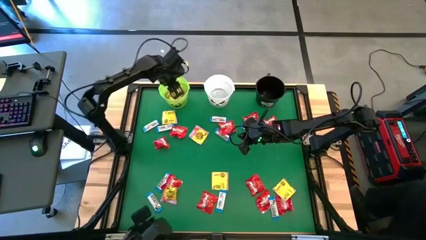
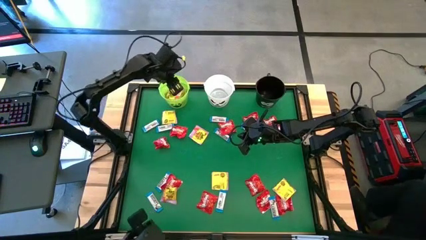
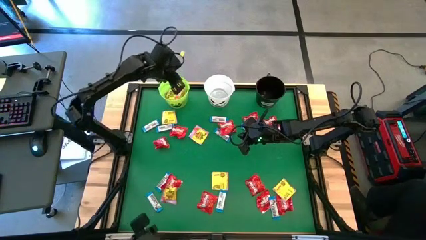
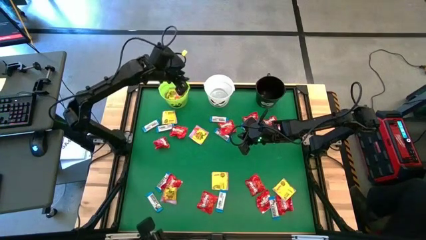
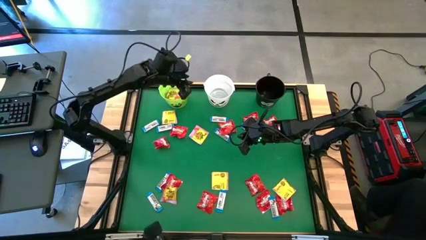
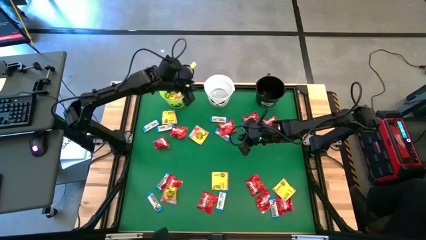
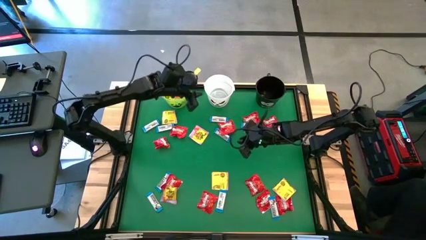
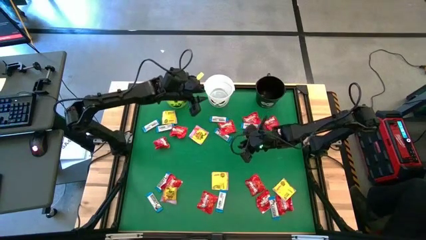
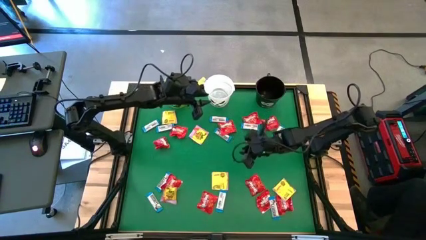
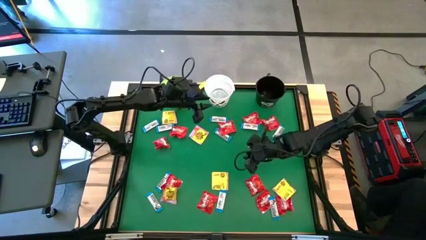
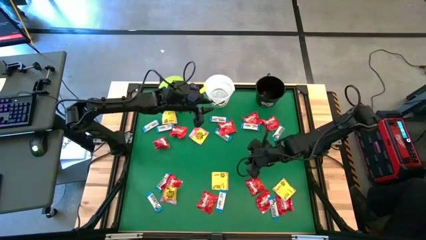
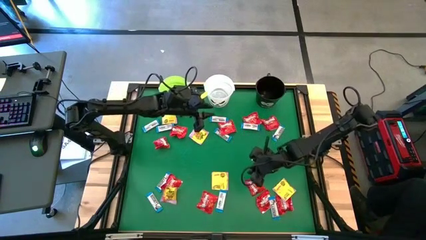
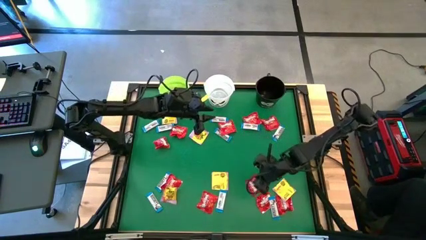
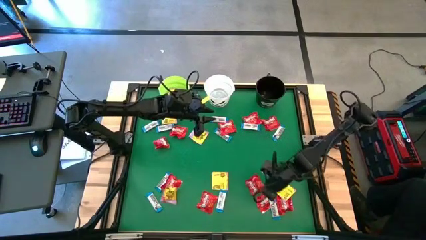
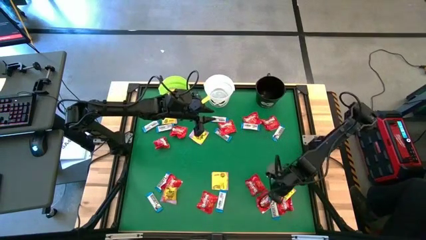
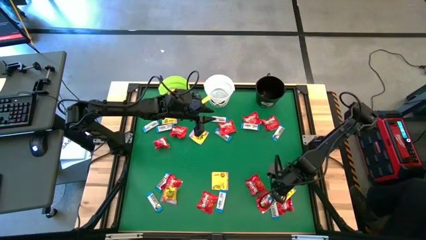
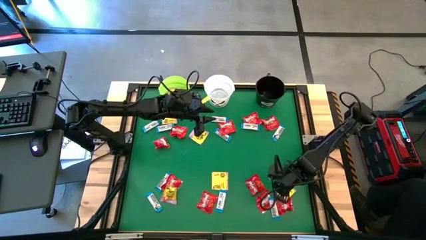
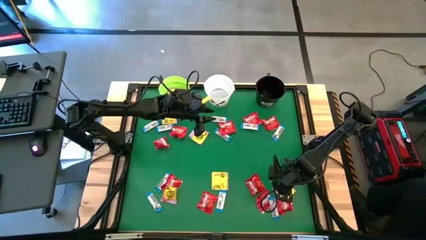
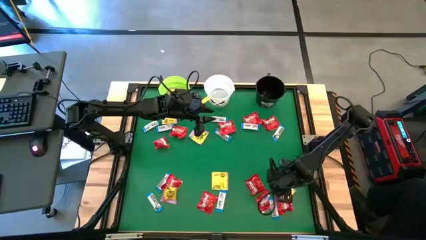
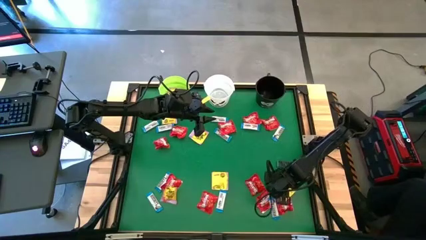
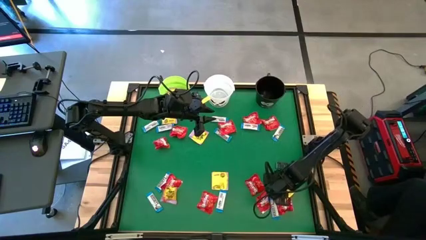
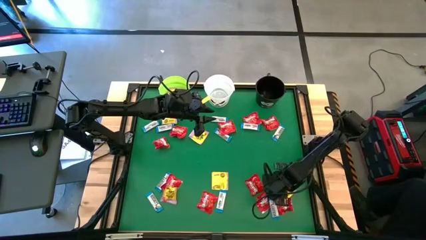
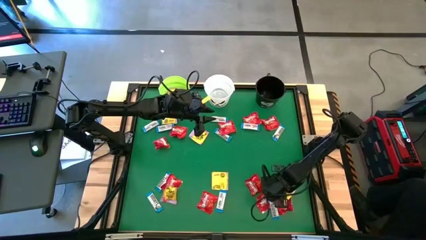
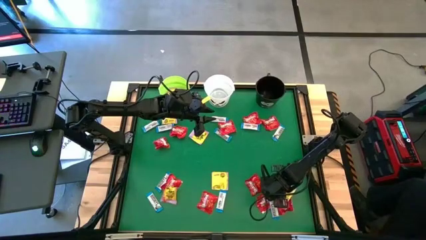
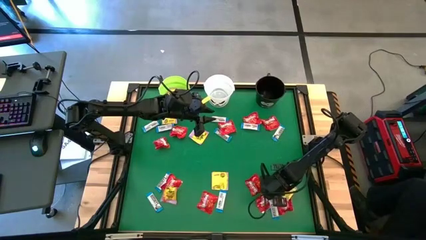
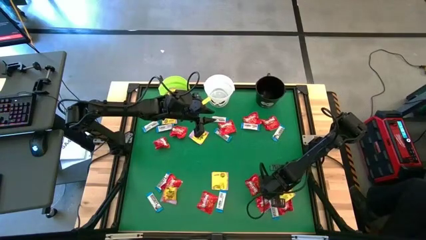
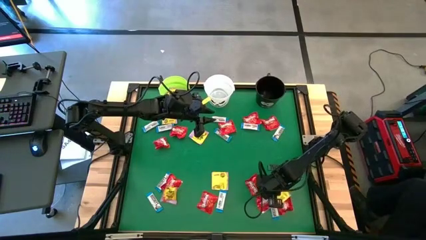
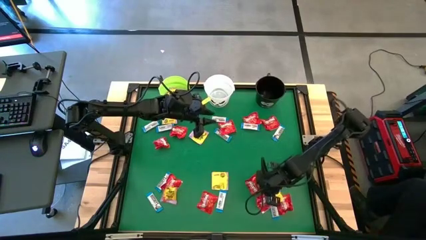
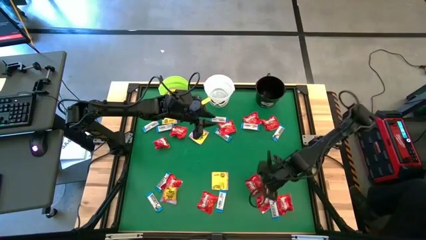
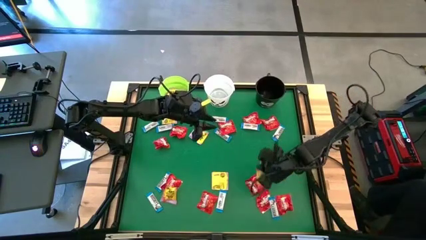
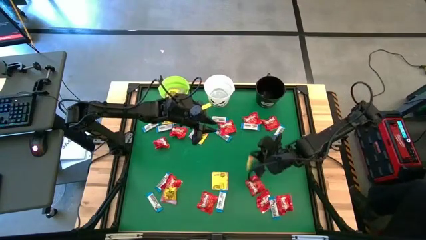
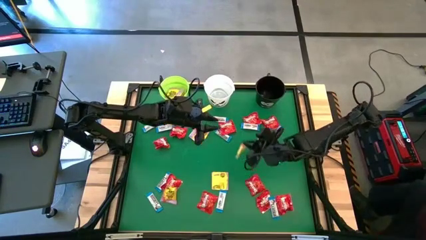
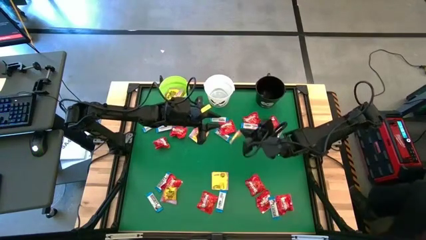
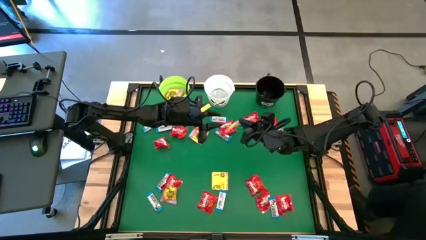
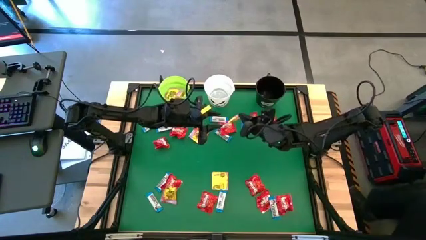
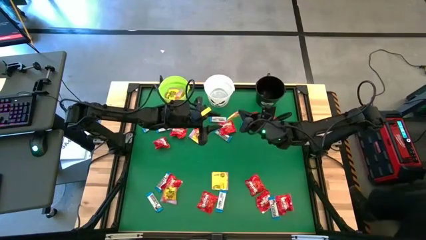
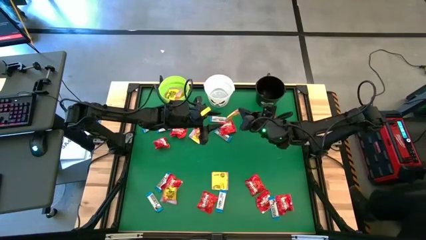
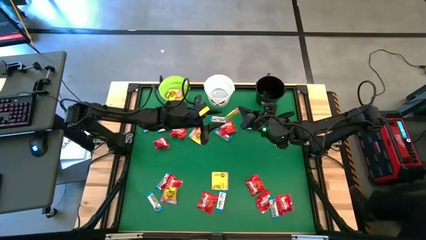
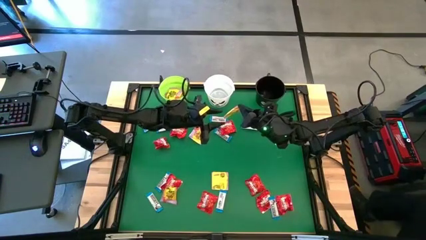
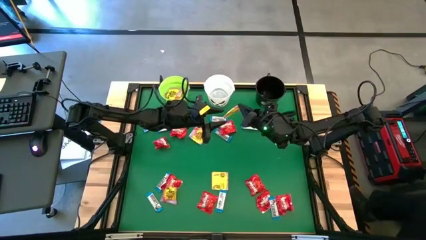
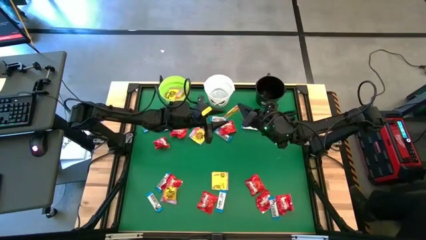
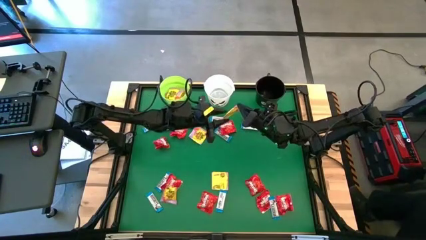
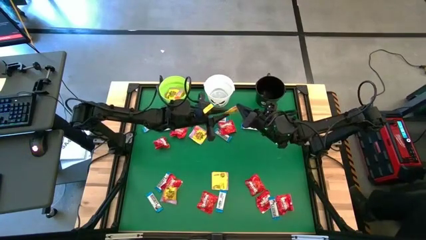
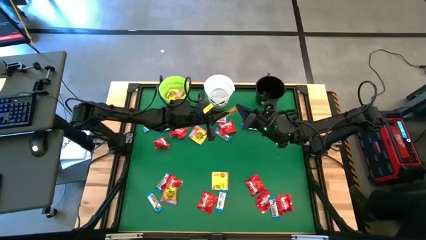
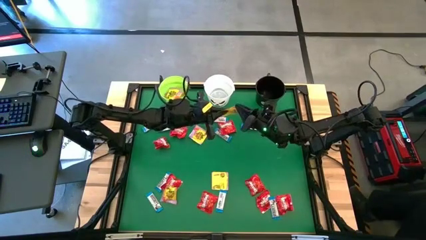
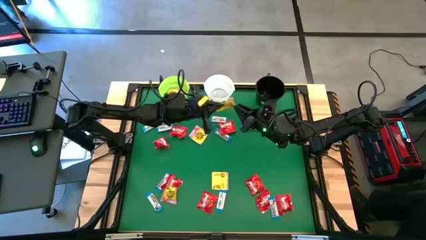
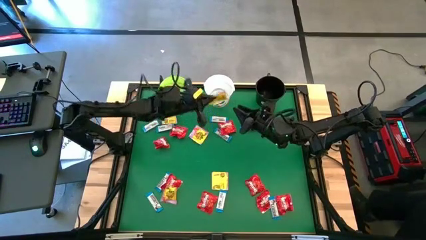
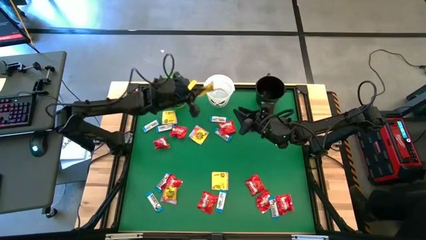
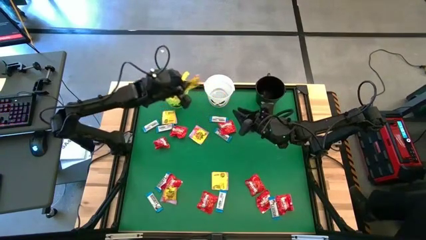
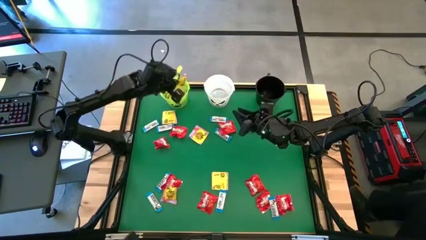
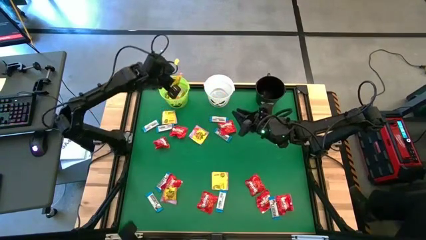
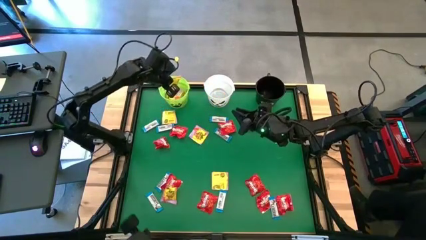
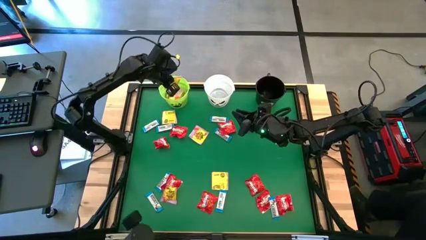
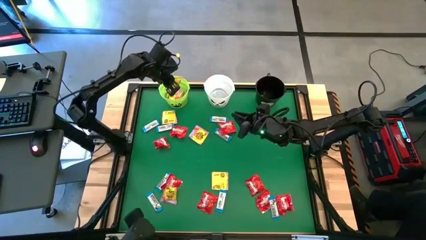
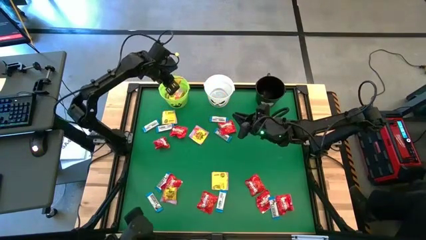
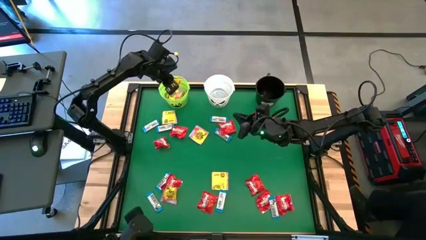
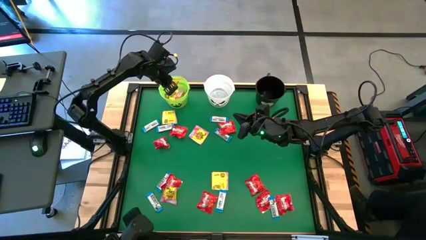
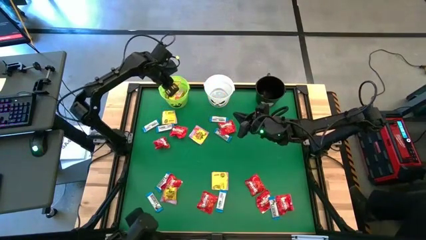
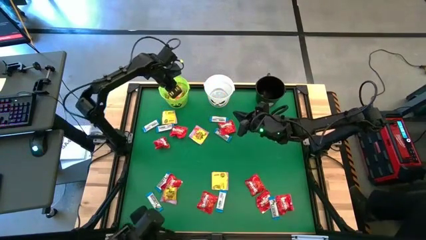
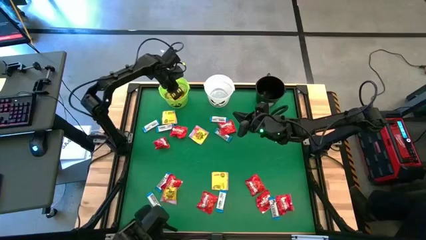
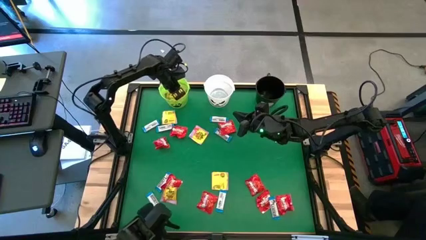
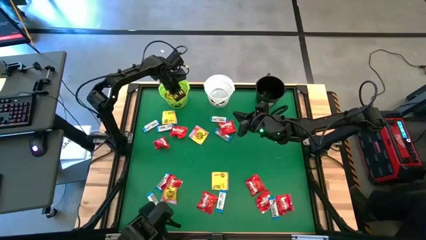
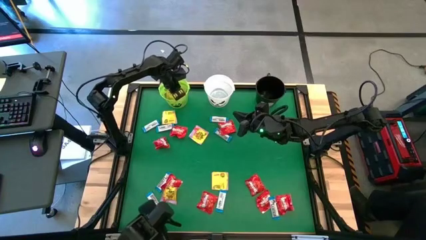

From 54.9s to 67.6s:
Task: Sort candy by brand, put in halloween buckets
Put the yellow candy into the green bucket

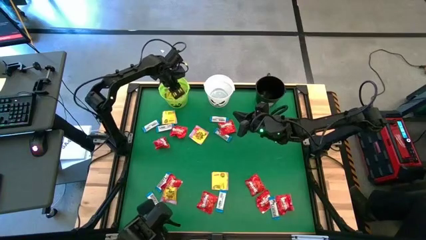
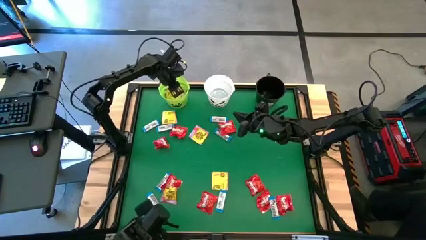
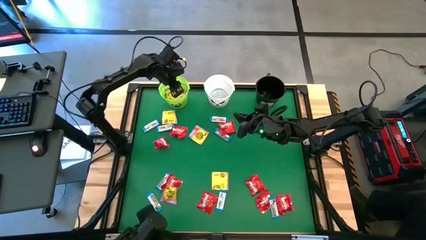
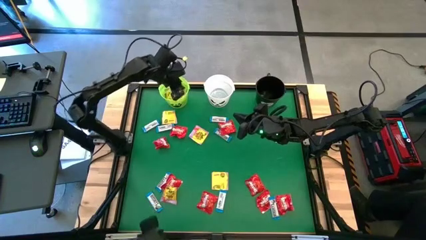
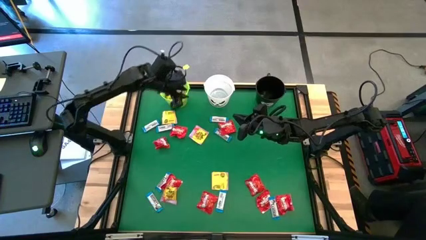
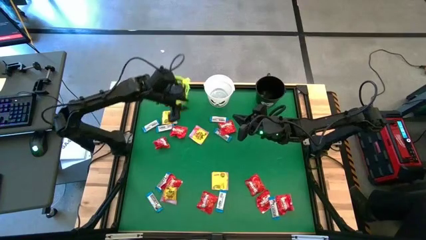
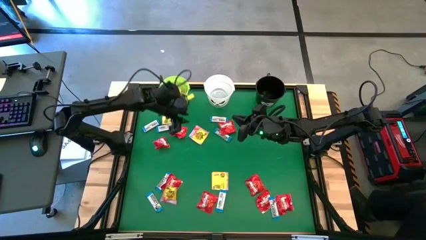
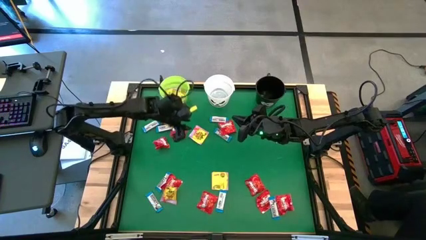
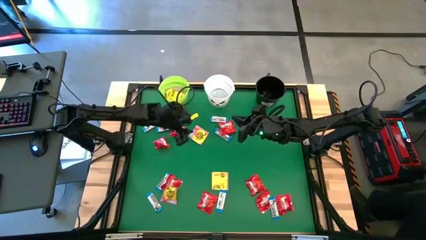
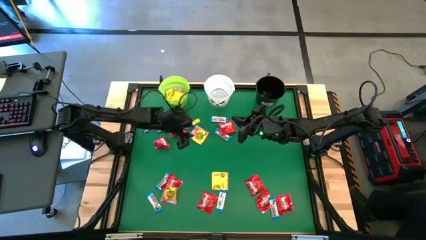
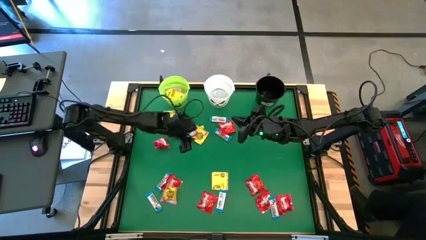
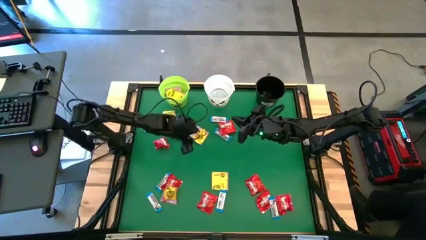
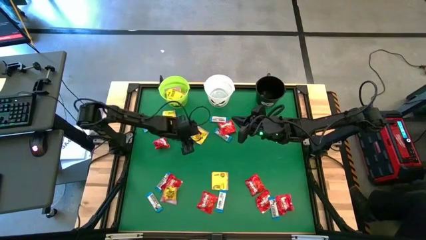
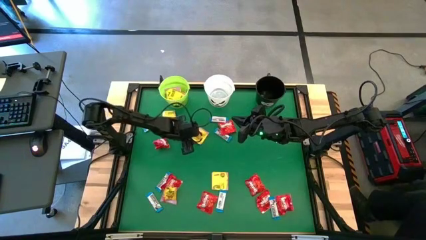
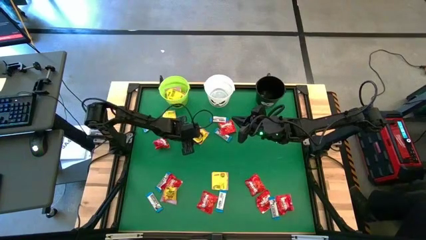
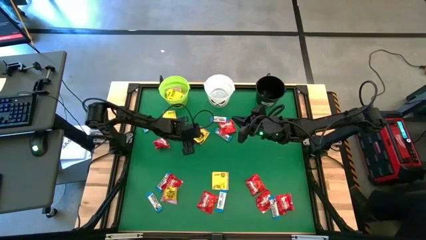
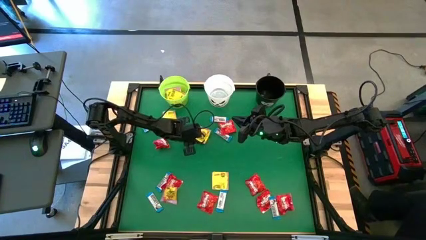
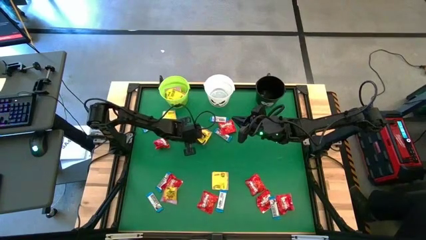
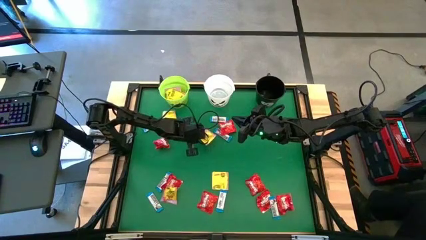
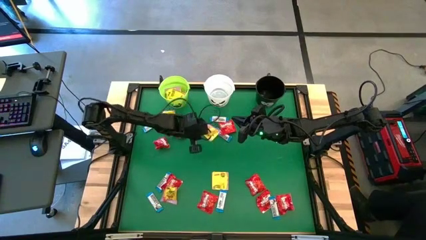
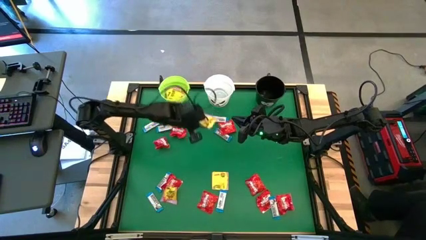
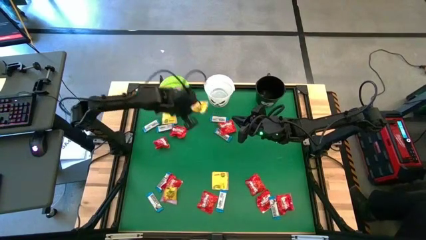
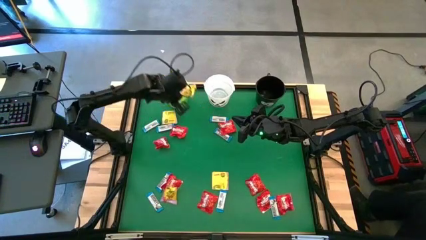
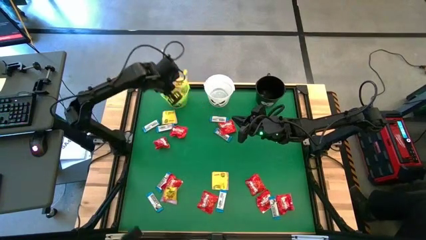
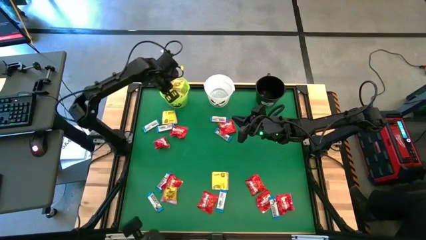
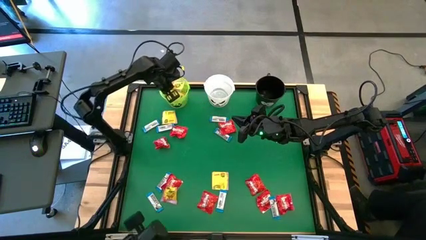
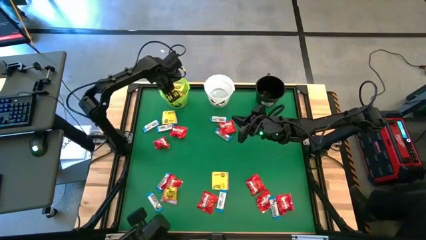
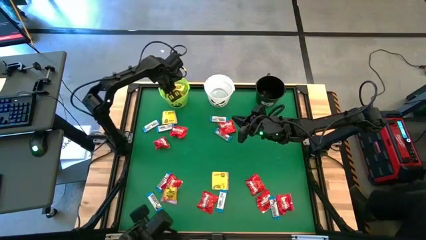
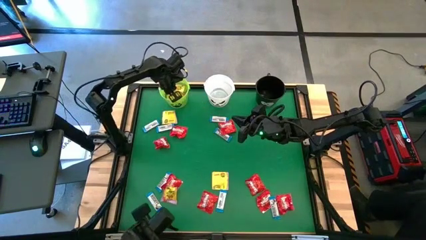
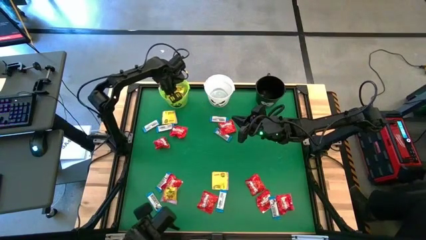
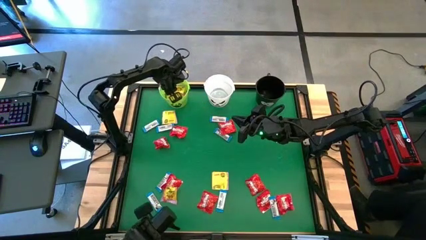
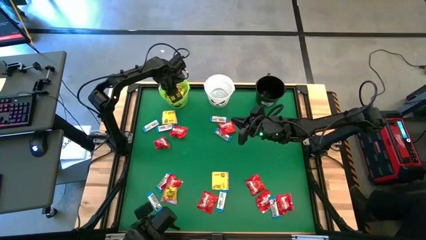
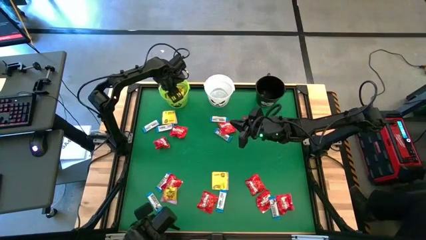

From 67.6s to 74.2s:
Put the yellow candy into the green bucket
